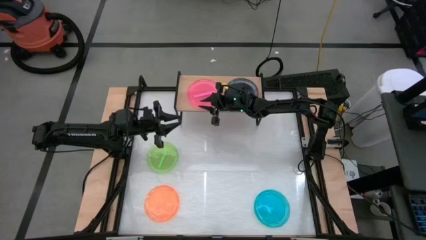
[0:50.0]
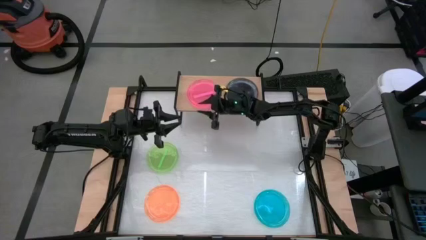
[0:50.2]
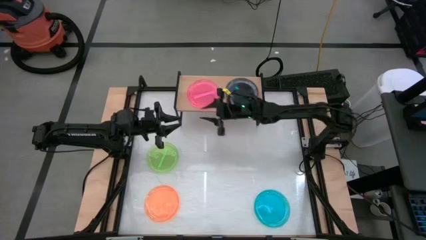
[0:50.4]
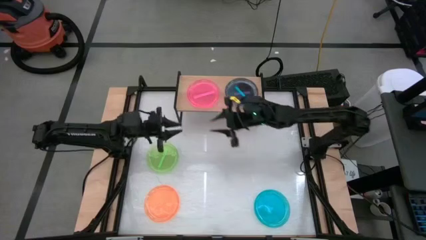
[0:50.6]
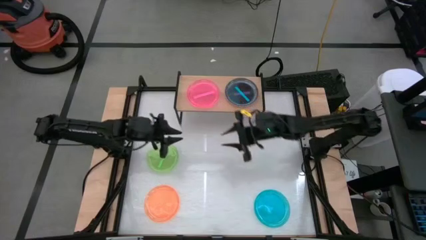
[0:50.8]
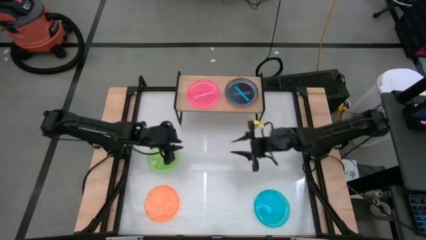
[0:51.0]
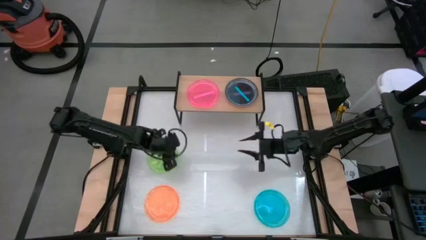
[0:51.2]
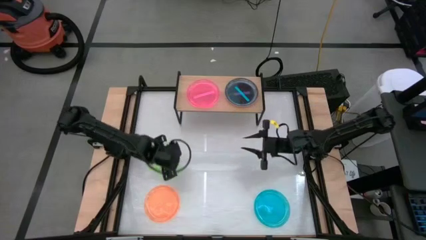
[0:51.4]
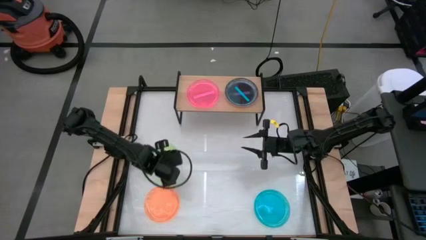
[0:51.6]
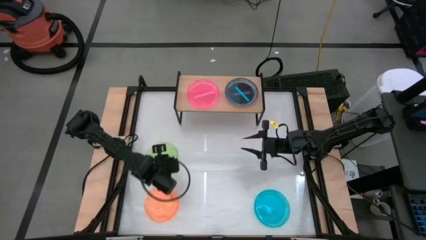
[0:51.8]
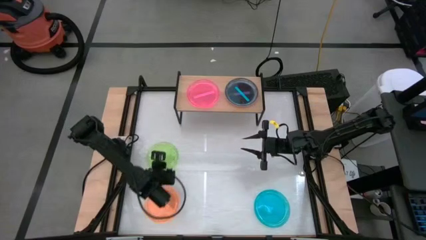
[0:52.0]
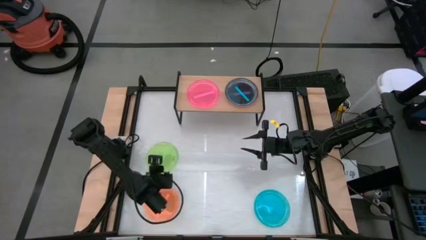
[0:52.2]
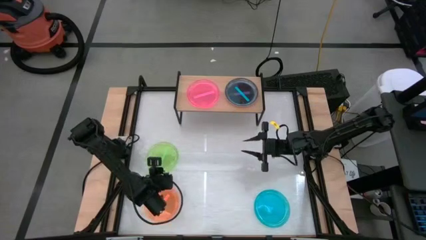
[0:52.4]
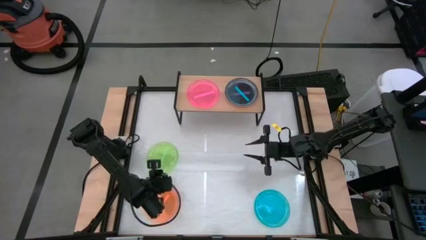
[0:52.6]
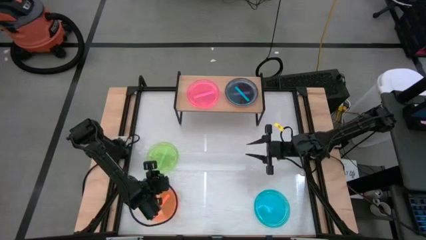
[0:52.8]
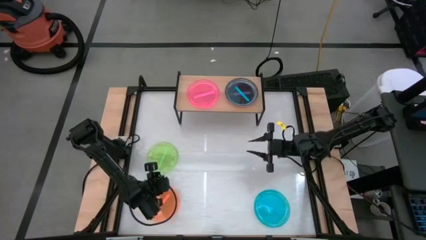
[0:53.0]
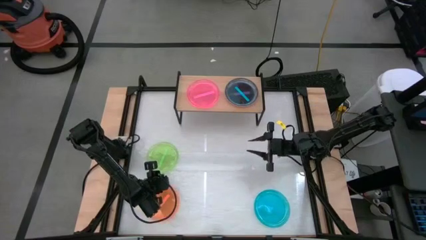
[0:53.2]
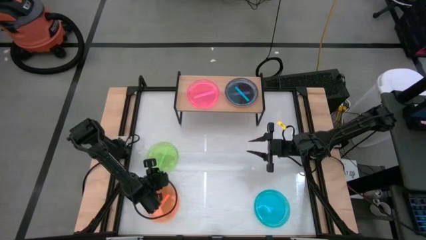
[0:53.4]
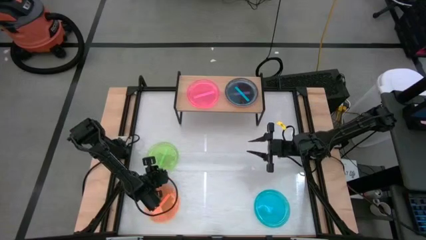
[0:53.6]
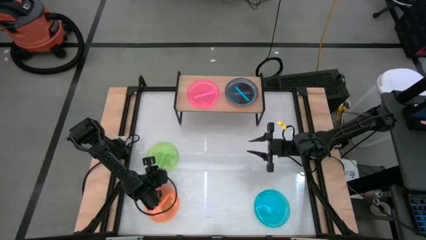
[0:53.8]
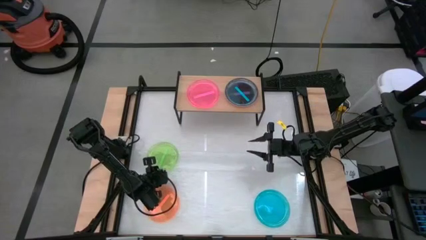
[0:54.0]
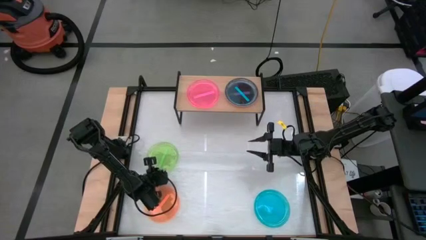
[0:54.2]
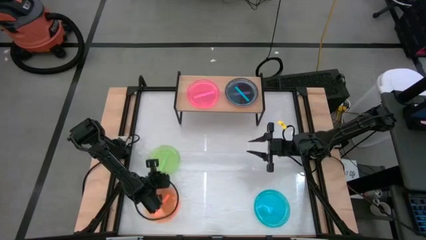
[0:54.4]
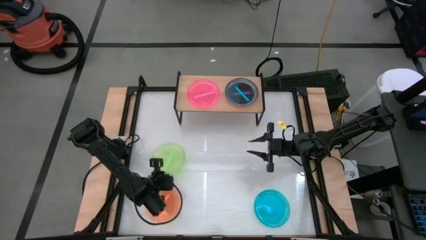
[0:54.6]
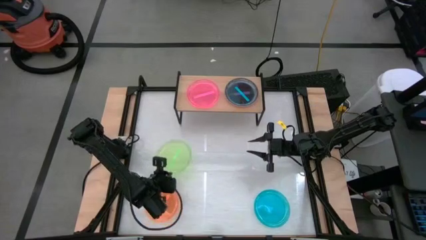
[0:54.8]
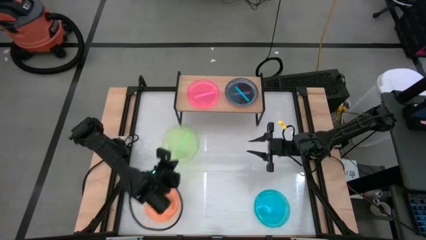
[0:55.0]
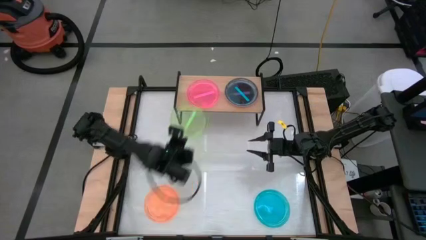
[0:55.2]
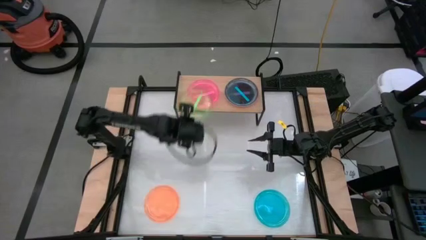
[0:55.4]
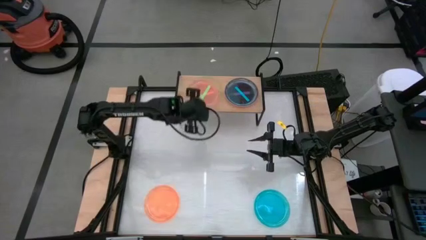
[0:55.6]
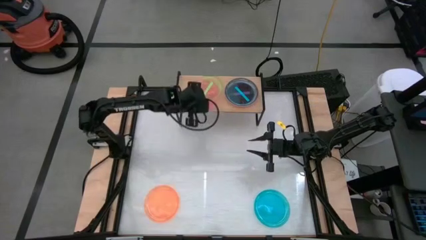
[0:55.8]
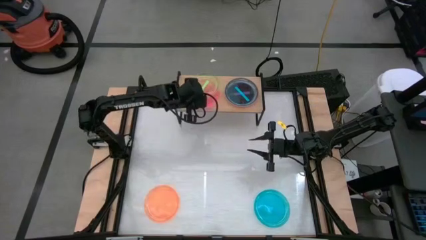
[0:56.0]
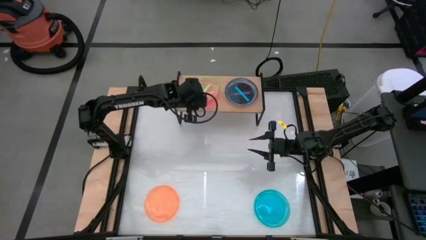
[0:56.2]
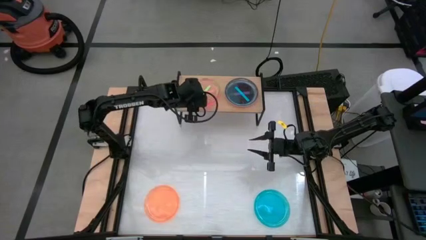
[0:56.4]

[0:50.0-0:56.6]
Task: Place and stack plates onto a shelf
Stack the green plate on top of the pink plate on the shelf

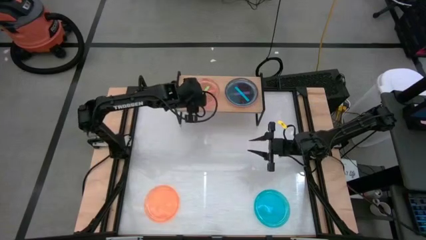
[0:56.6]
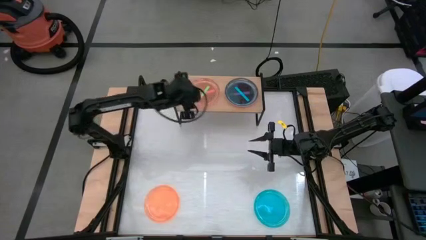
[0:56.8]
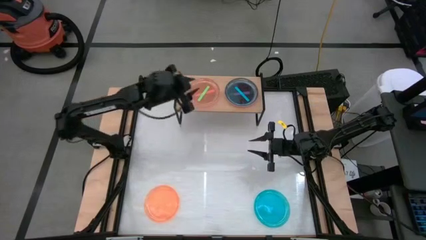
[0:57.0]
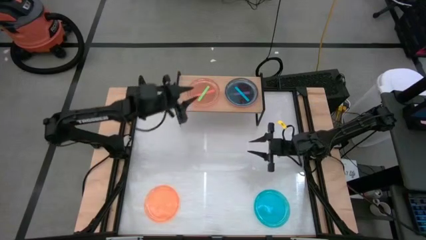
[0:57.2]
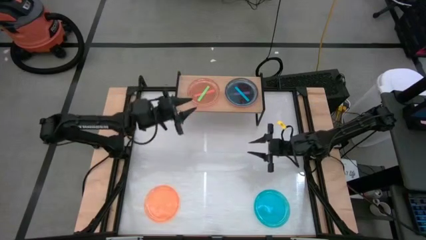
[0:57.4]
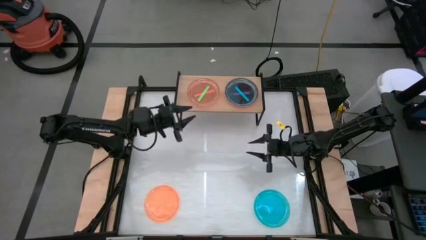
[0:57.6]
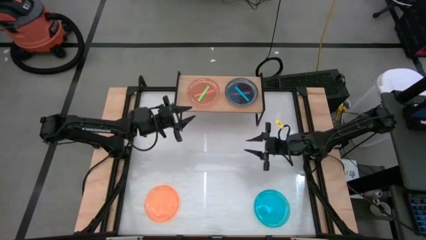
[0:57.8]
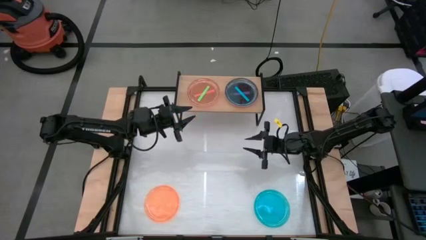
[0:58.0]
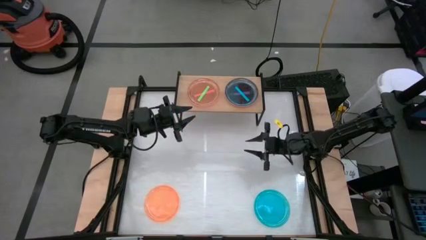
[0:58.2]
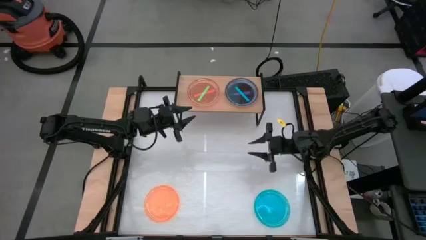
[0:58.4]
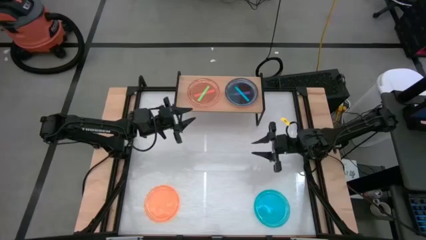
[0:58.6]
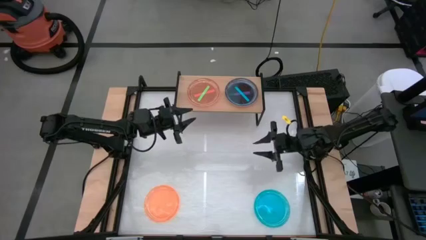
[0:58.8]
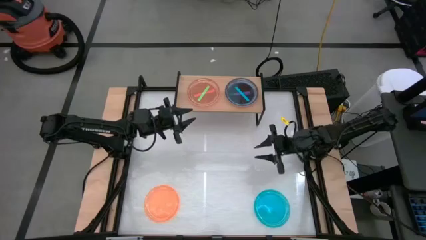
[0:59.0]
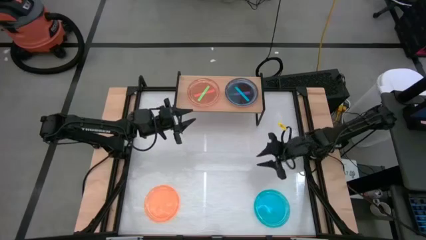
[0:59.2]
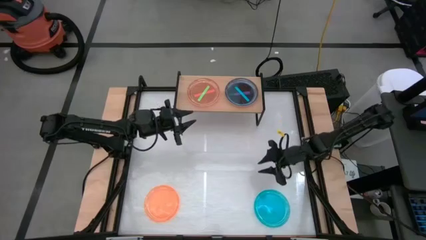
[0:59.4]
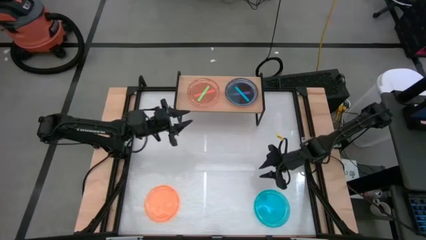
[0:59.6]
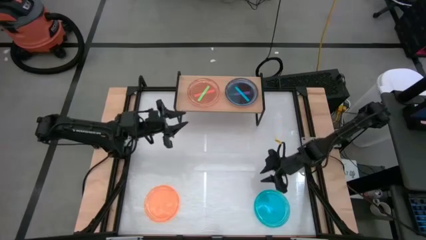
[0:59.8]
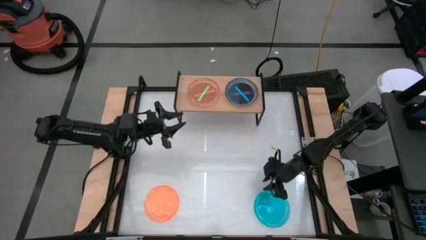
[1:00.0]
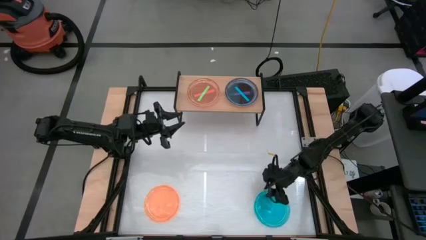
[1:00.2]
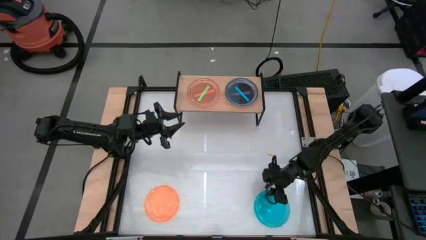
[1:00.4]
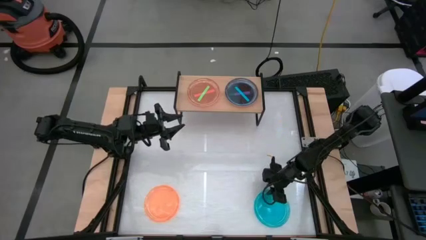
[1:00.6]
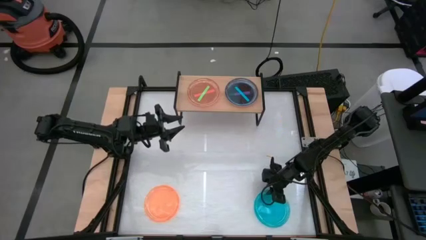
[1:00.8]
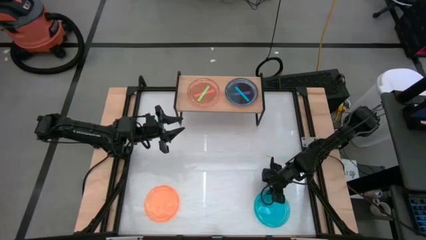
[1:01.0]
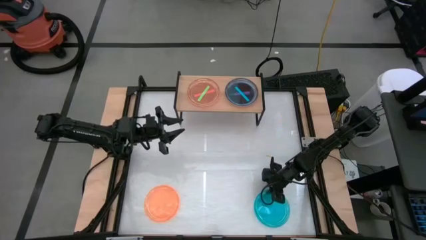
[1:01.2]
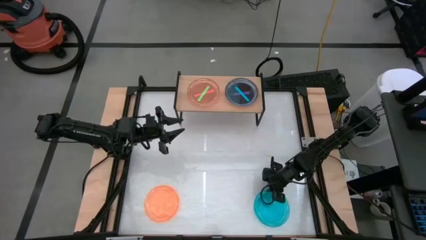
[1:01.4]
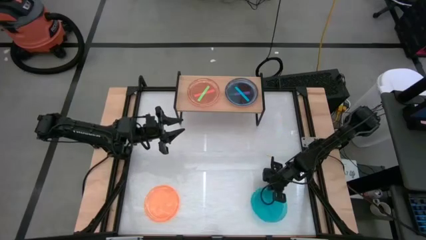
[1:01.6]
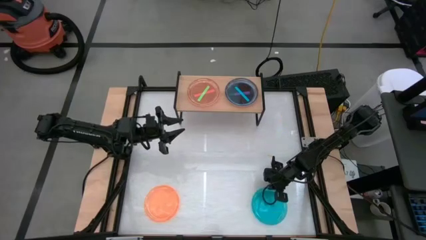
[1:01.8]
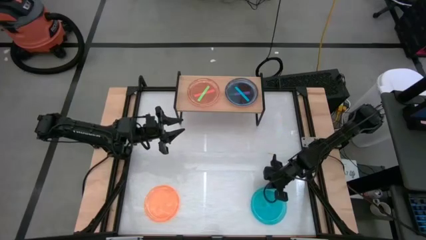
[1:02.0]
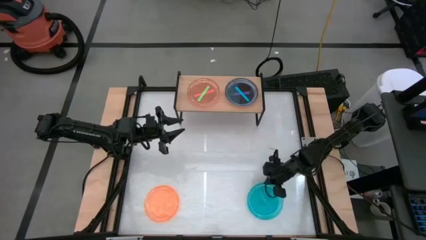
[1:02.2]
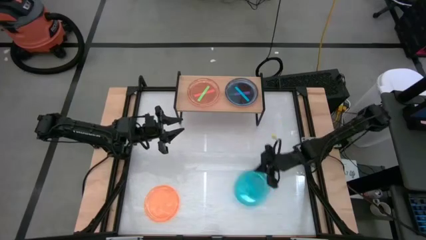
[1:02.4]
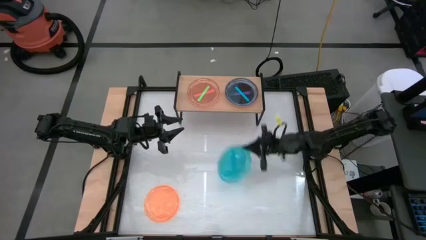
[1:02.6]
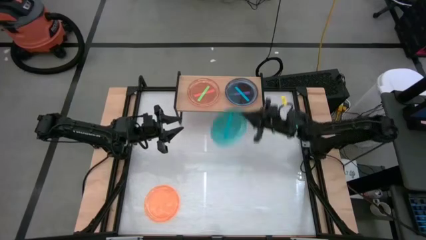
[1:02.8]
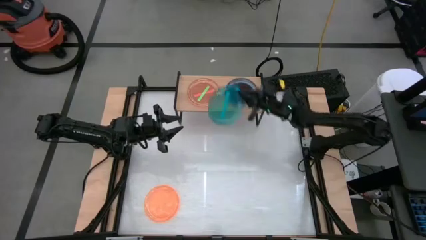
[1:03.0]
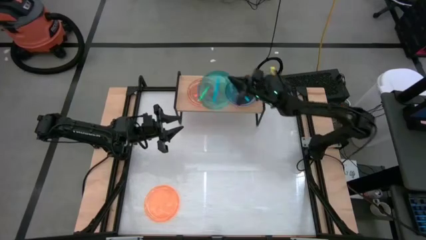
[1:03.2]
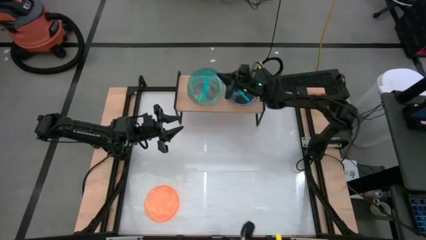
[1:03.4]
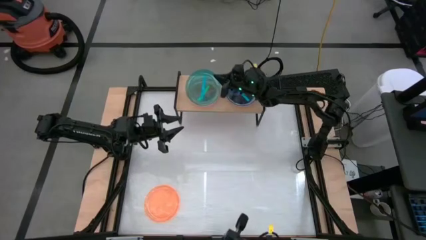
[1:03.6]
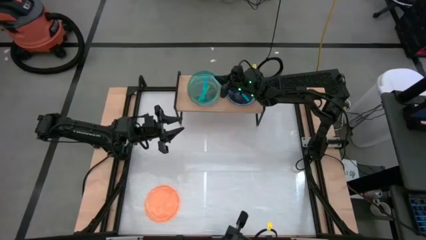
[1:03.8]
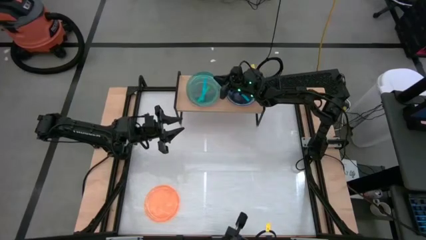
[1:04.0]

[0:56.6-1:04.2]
Stack the blue plate on top of the green plate on the shelf

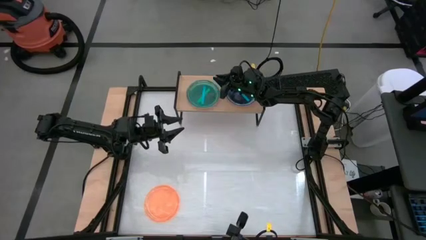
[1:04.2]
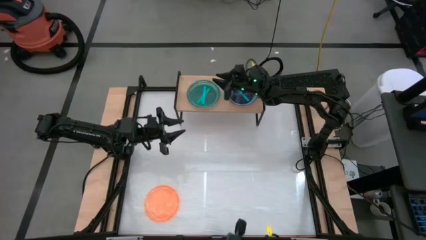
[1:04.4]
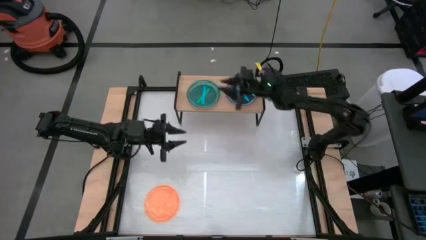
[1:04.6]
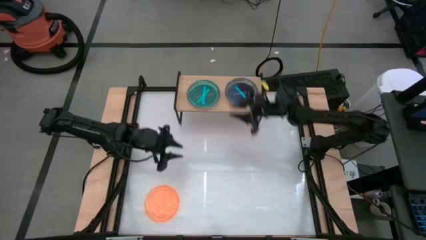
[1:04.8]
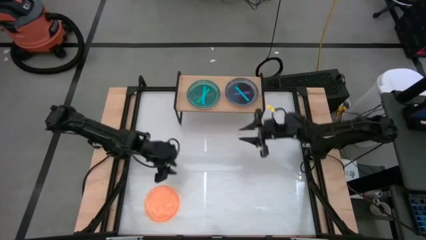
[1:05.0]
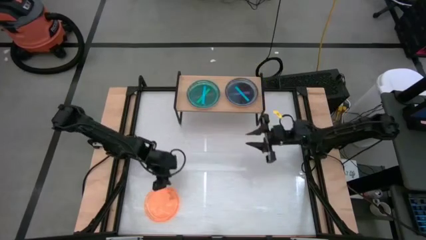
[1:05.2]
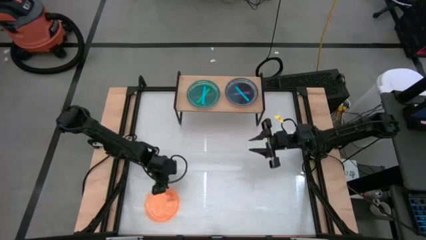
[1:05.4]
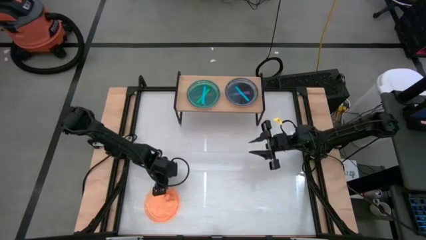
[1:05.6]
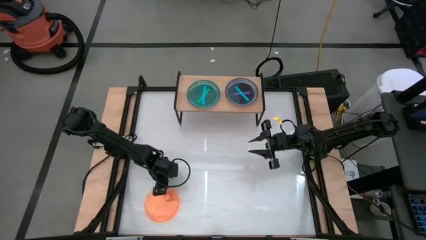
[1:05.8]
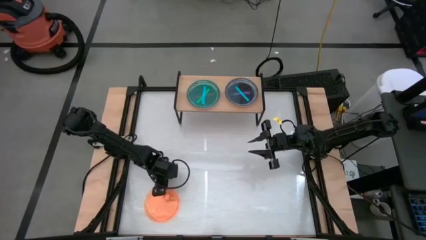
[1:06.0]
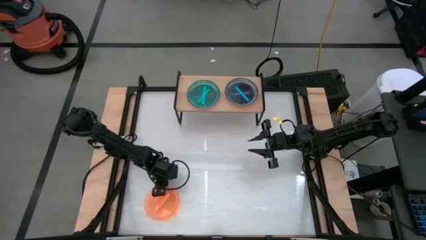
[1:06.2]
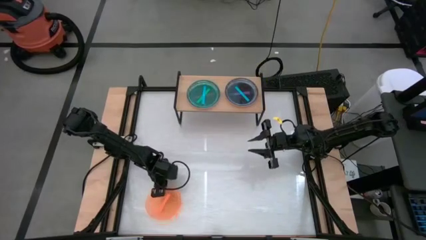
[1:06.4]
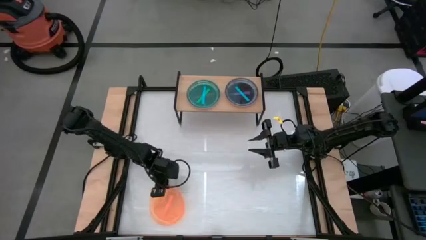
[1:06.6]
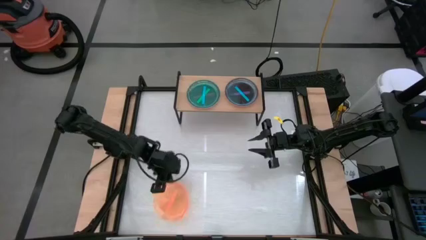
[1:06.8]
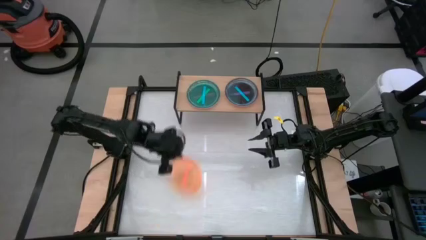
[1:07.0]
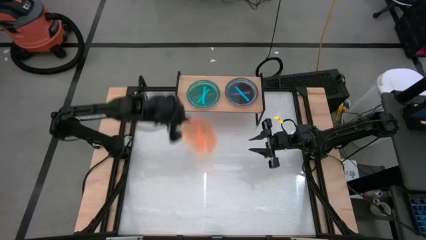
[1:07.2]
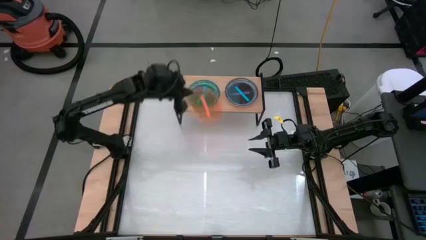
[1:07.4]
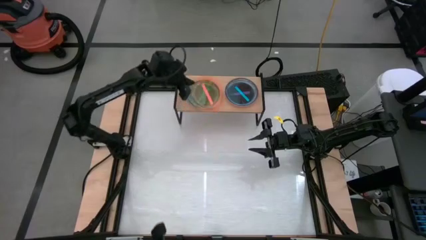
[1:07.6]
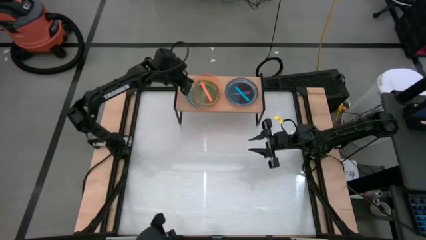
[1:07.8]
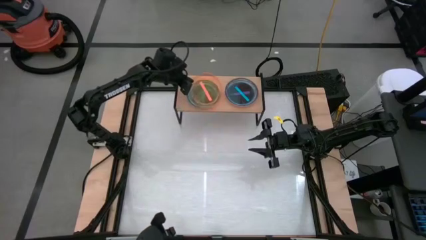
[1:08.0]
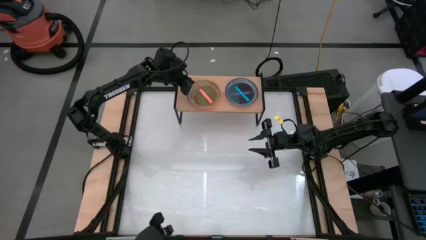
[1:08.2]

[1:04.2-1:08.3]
Stack the orange plate on top of the blue plate on the shelf
